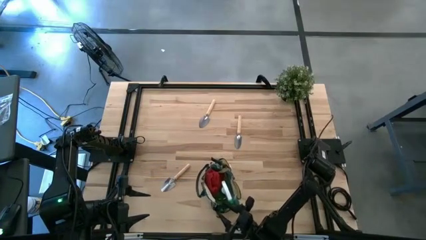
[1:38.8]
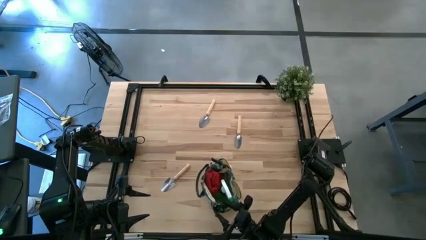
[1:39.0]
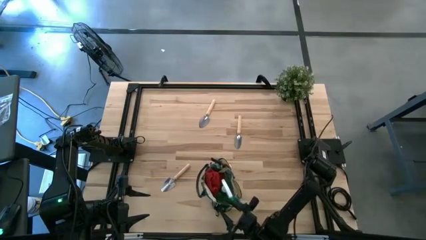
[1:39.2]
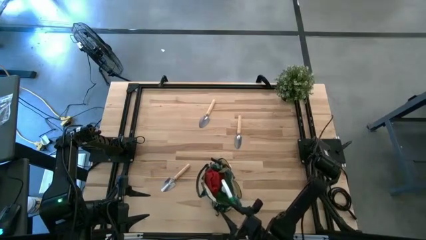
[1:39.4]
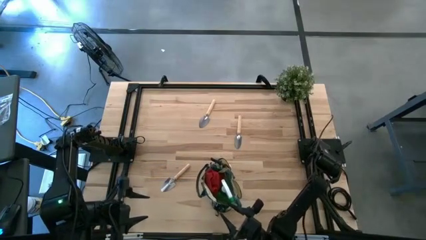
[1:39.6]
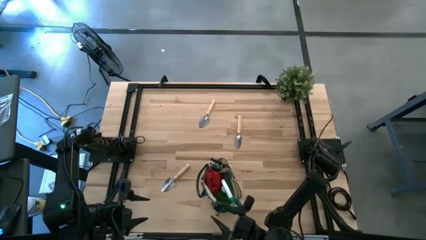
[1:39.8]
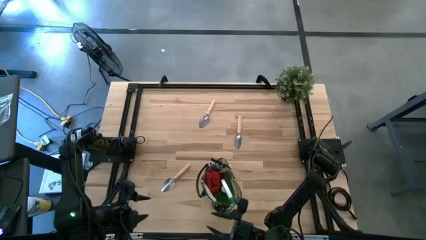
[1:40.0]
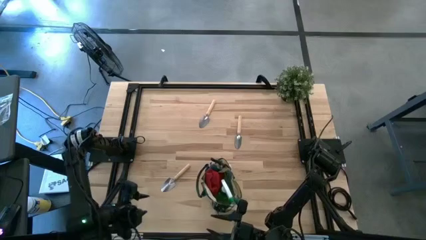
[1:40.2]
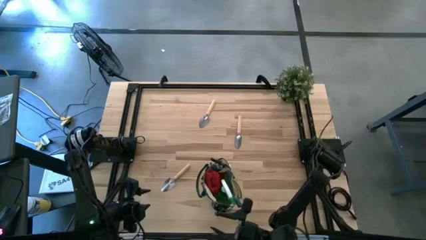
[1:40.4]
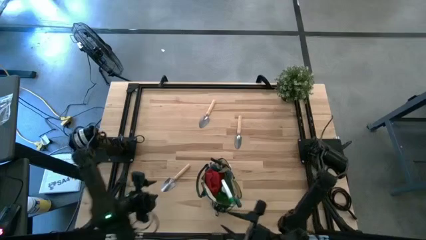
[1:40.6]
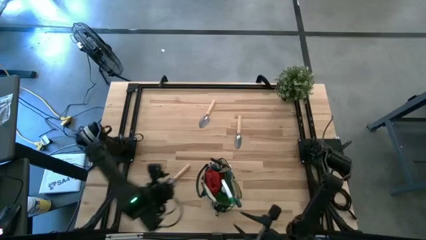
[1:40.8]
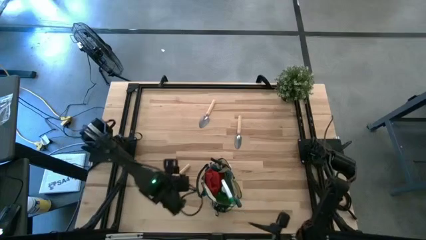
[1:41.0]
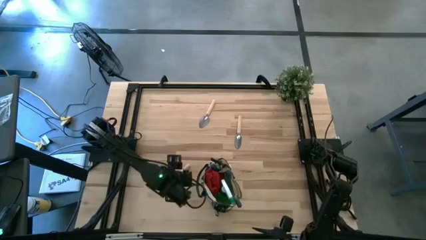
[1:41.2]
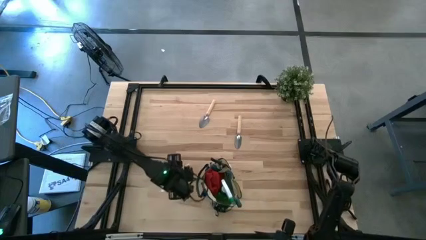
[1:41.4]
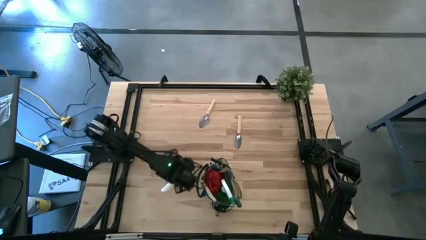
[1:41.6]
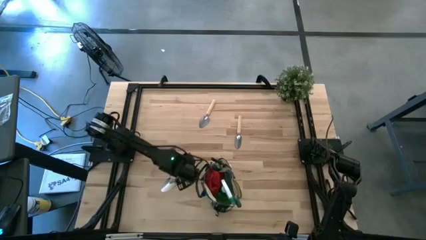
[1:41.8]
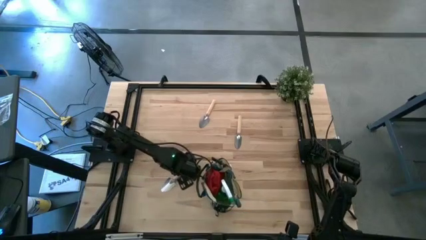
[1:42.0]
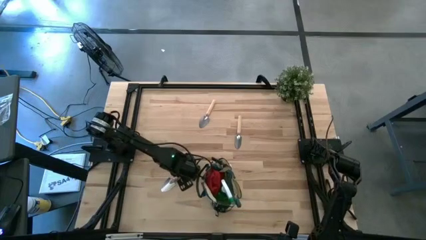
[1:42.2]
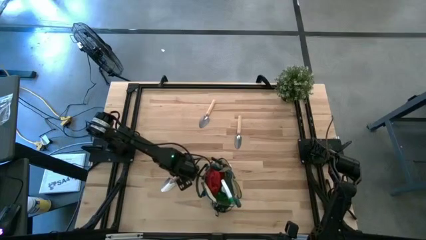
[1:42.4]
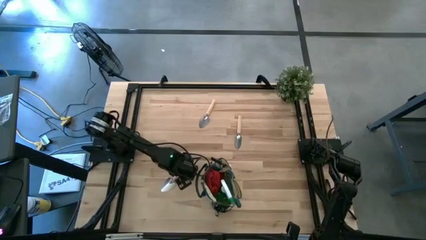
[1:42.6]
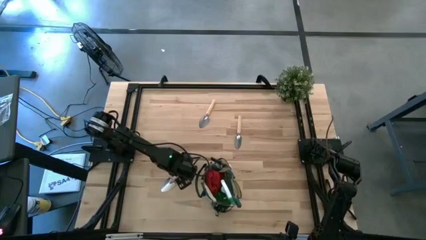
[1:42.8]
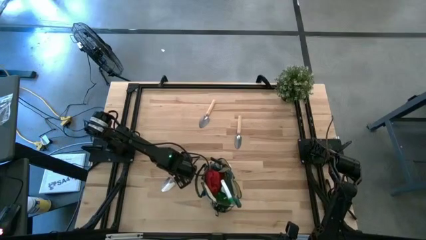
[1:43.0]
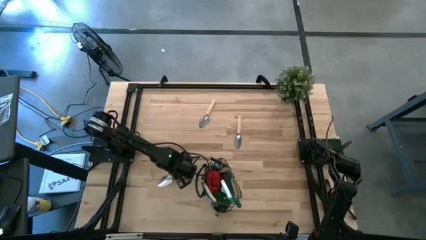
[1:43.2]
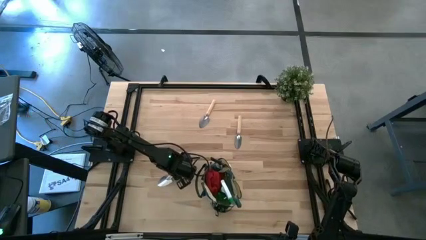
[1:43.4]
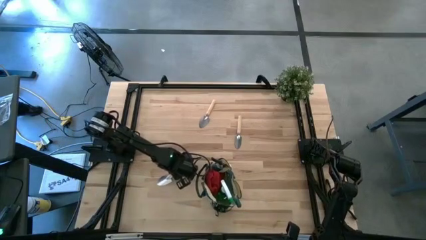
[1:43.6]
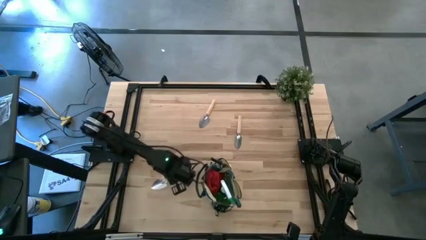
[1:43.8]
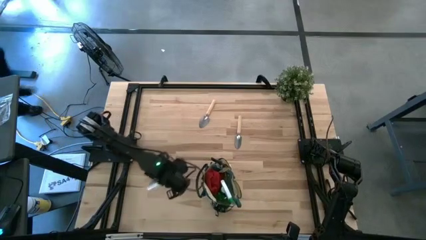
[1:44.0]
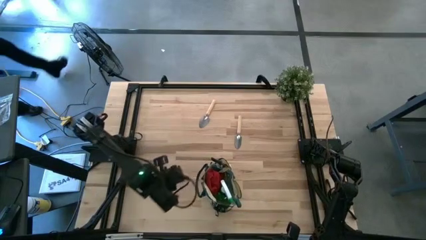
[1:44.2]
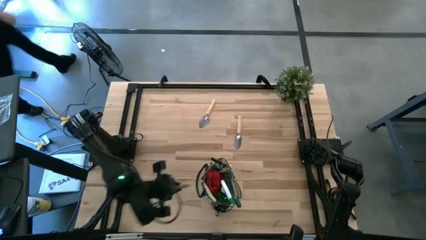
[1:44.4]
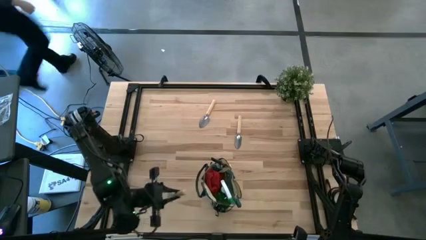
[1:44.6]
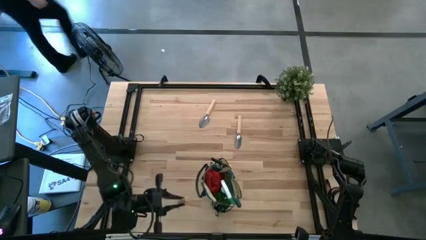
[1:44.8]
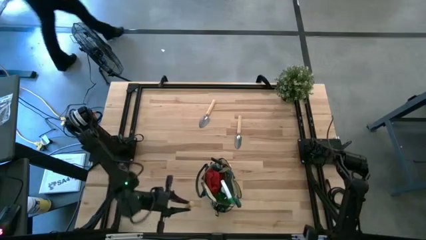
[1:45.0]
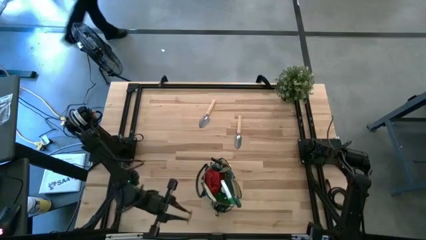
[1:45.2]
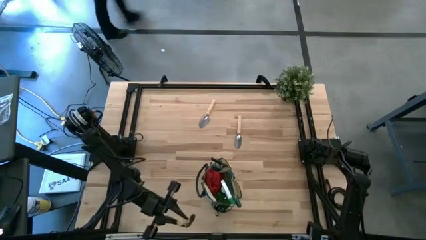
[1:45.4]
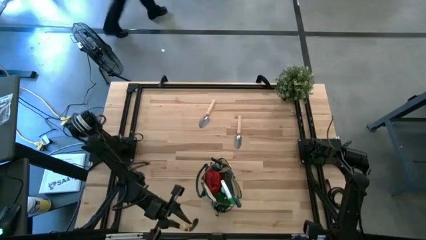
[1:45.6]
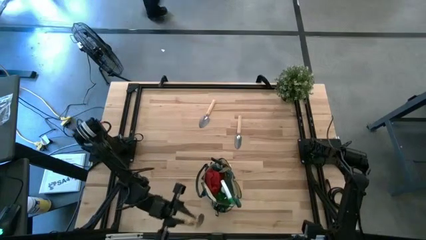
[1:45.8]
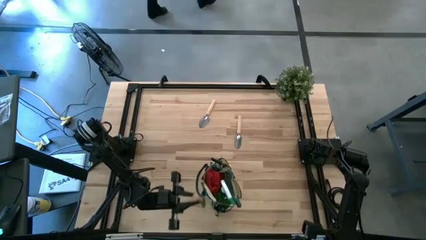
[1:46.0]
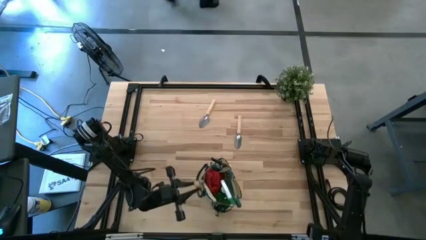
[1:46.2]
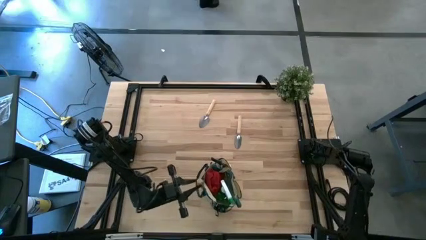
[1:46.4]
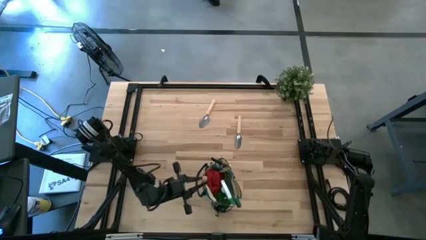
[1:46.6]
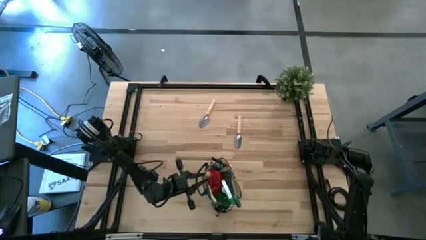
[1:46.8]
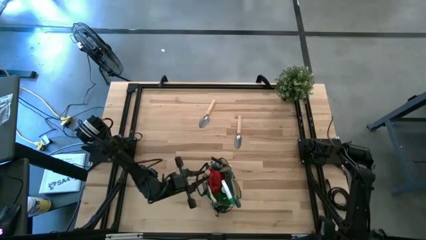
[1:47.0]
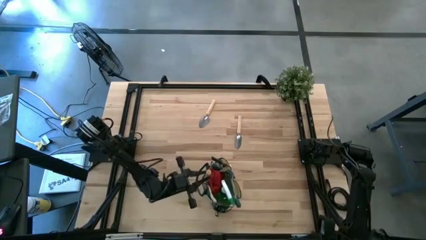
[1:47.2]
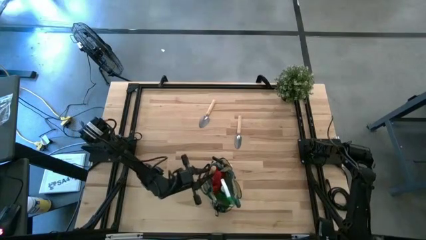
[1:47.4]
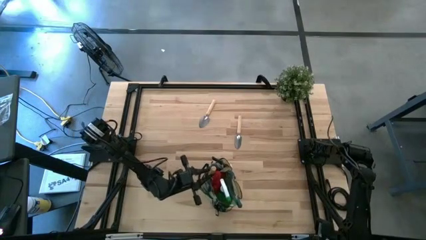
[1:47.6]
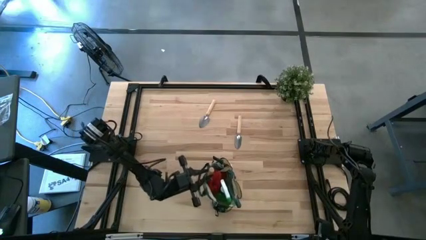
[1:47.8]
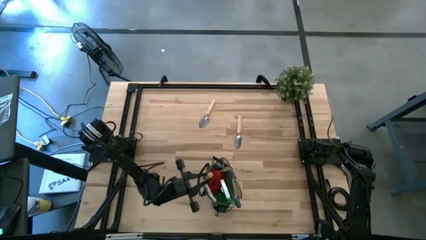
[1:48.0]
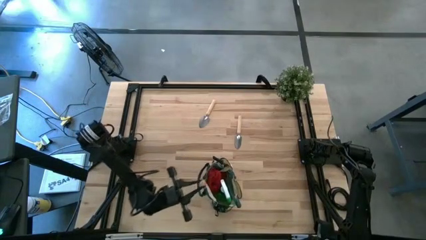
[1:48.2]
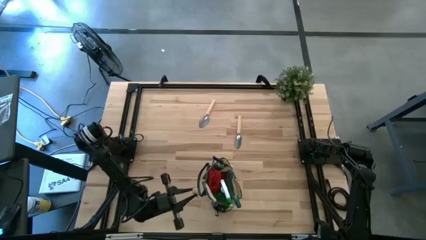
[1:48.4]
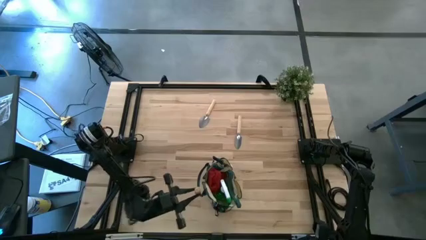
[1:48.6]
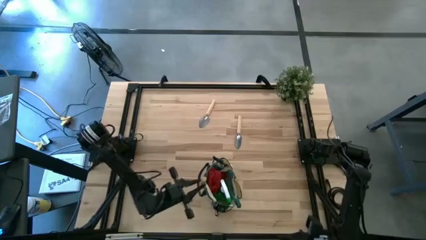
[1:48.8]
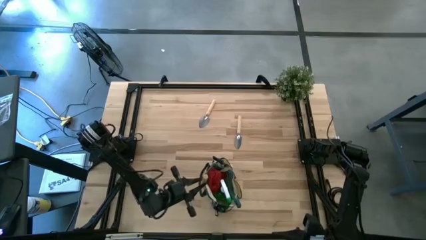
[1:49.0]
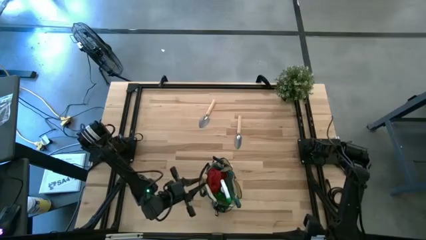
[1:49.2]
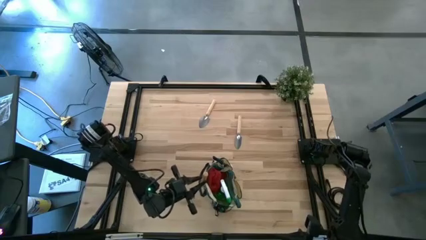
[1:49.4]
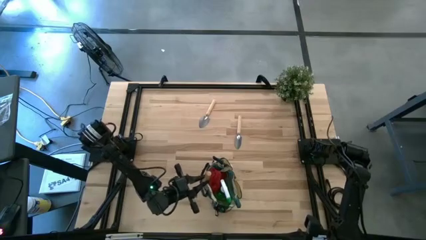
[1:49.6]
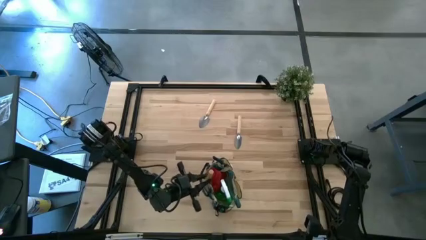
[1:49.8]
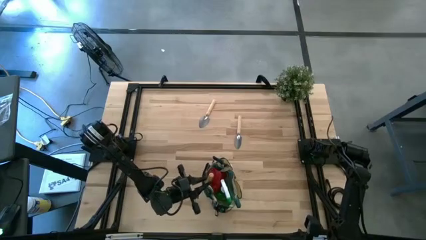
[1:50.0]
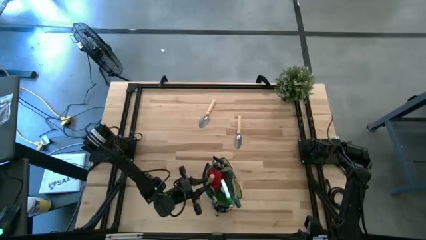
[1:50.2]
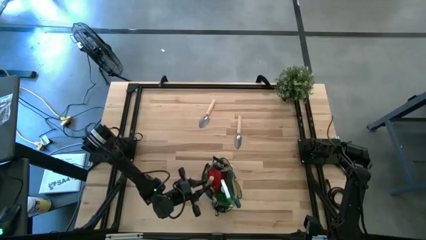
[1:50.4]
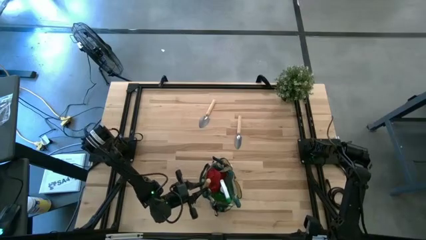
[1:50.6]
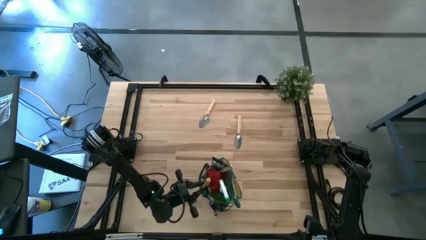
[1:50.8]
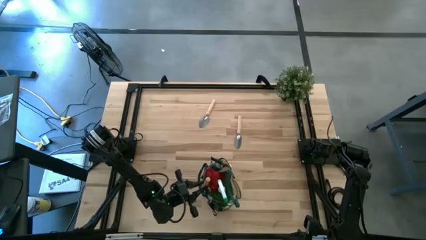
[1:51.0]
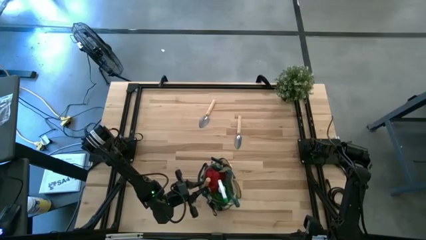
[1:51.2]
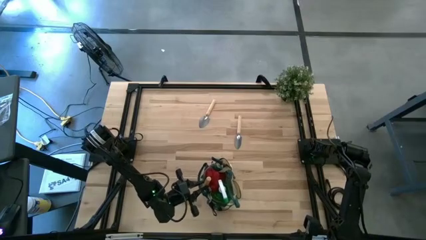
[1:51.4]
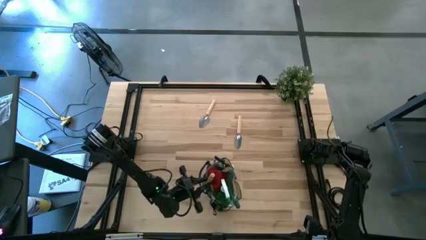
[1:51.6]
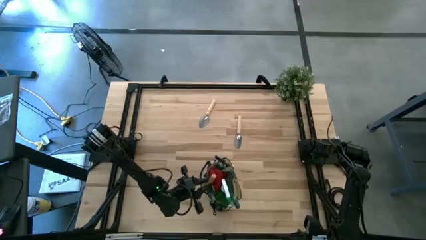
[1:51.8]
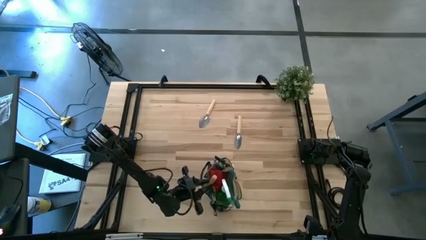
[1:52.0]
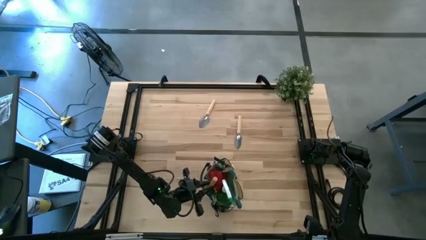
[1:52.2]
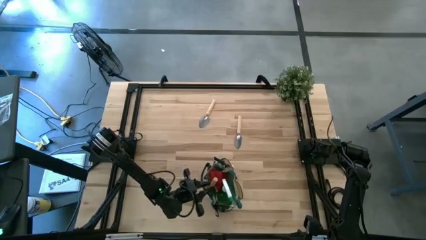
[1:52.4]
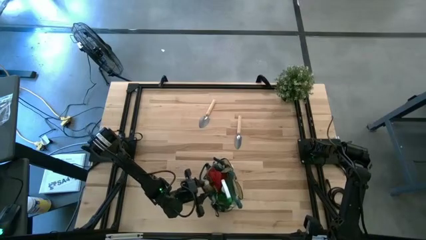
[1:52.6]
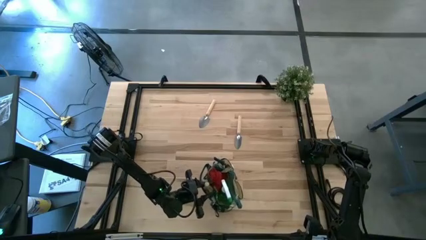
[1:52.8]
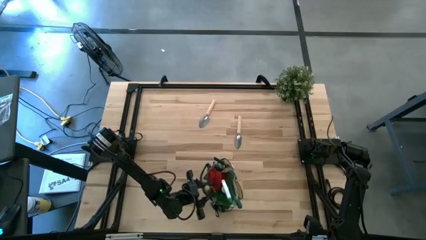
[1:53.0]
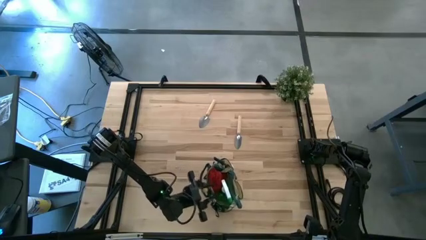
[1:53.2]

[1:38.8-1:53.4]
Task: Pick & Place Garden tools in Gardening bag
Put the bottom trowel into the gardening bag
